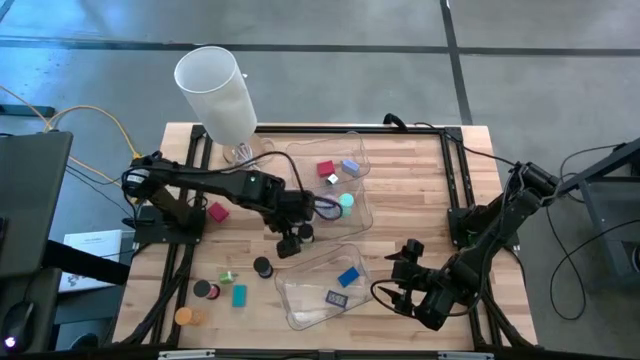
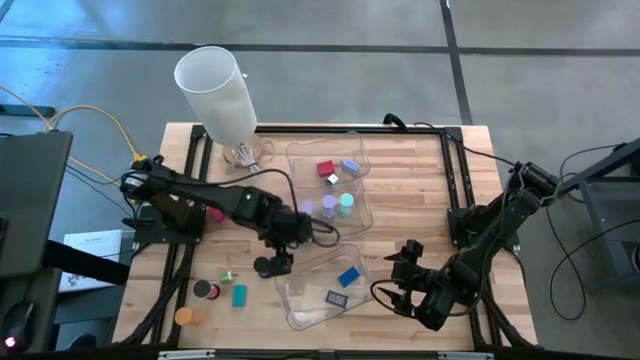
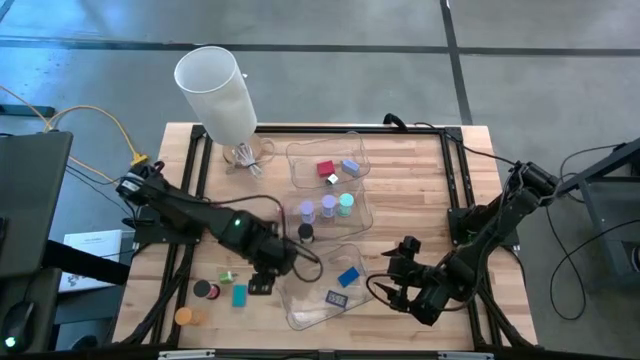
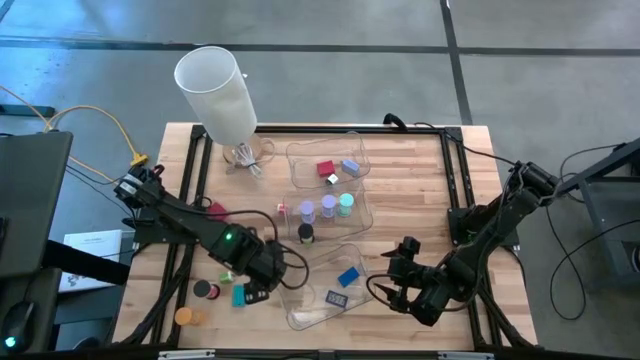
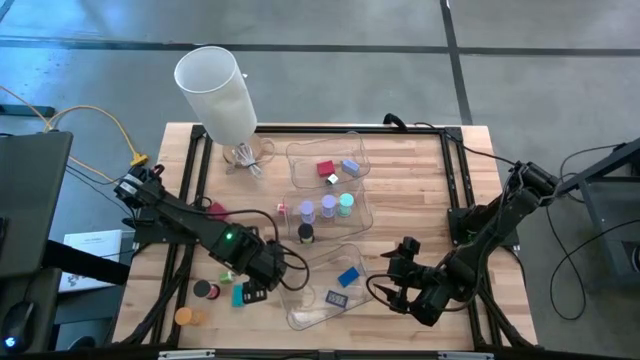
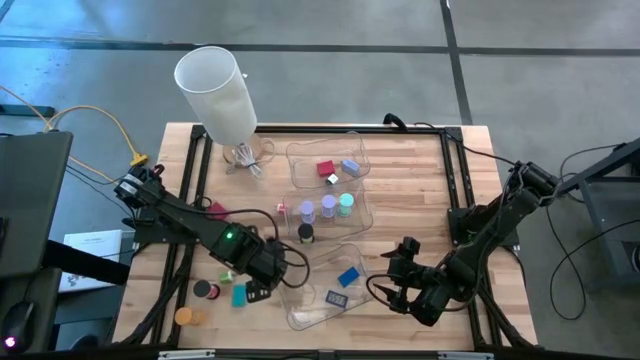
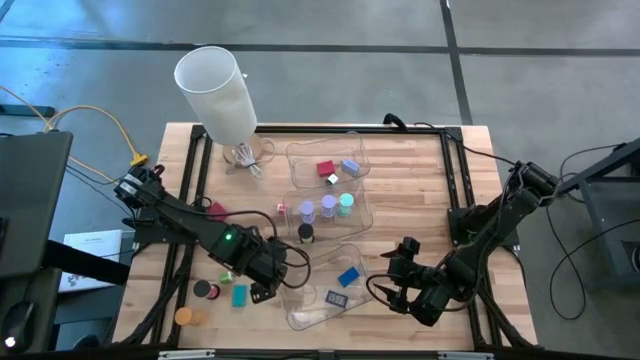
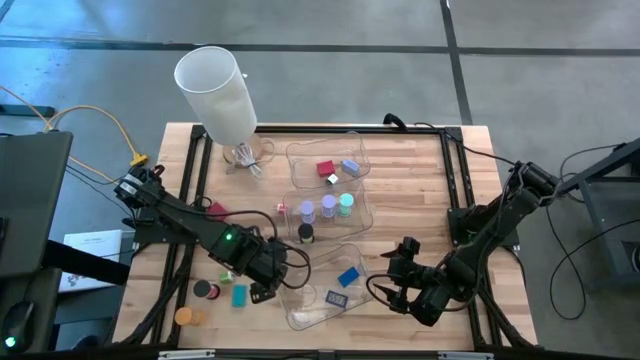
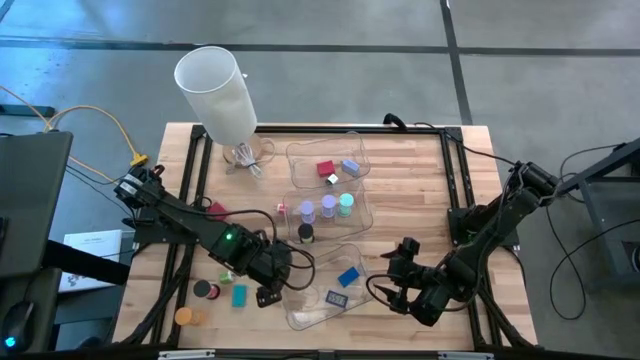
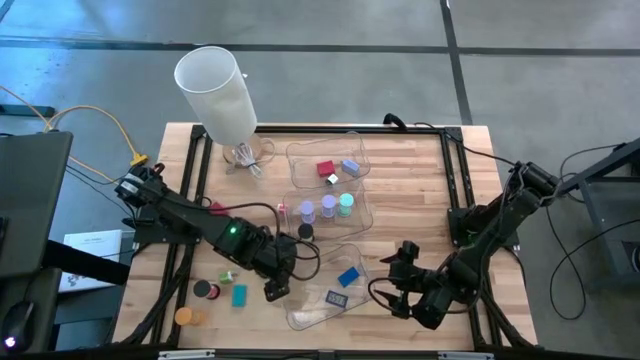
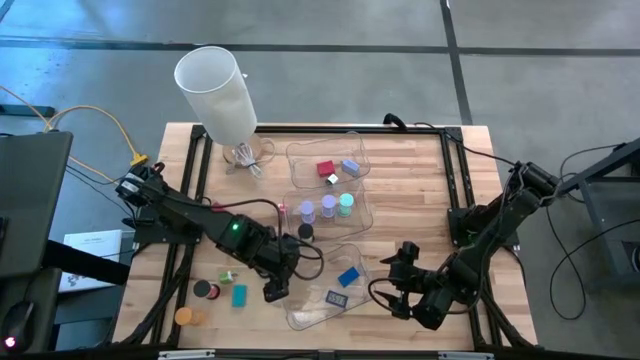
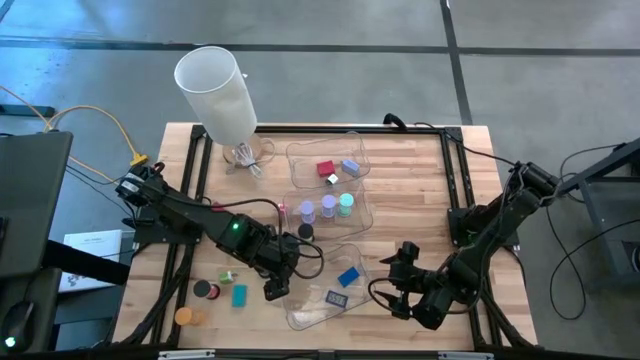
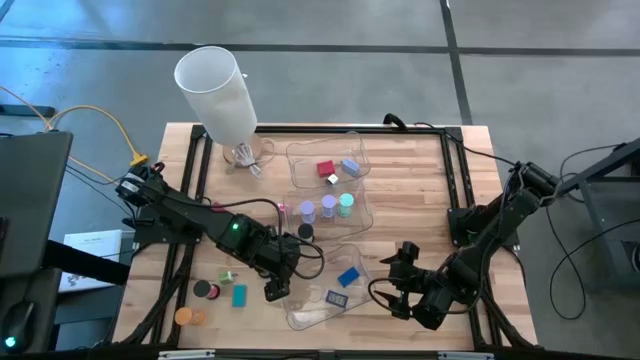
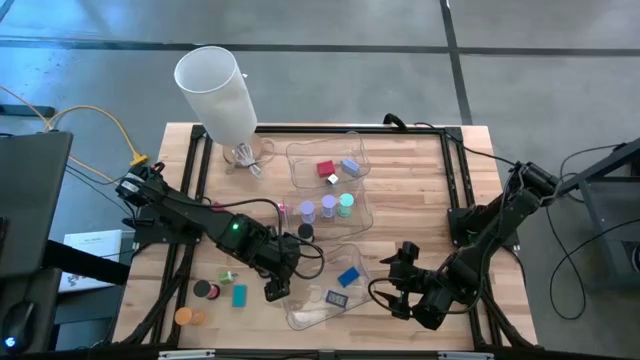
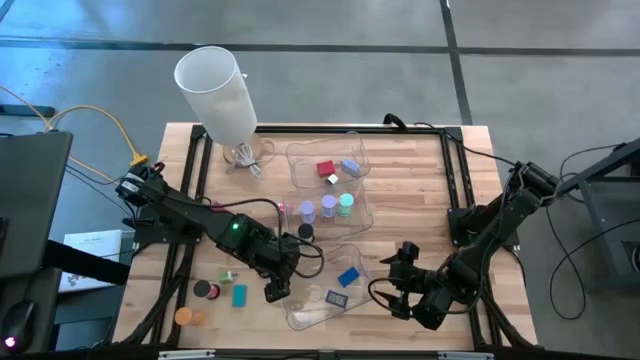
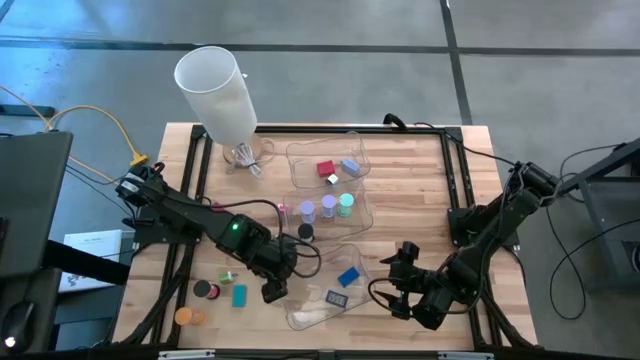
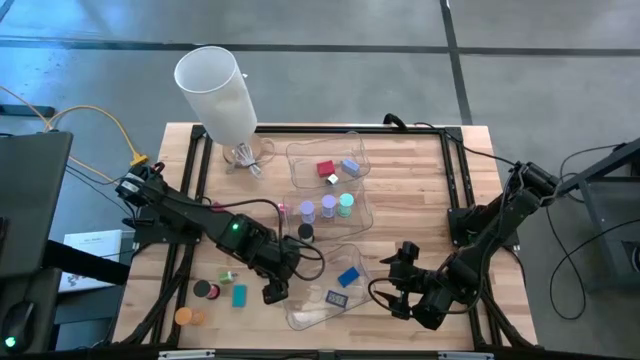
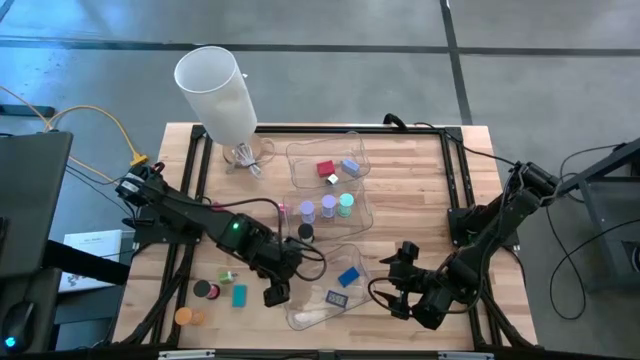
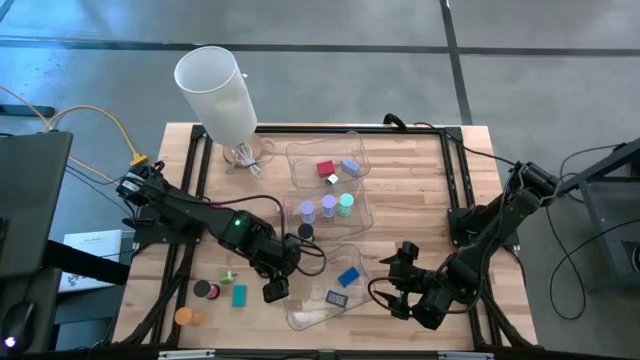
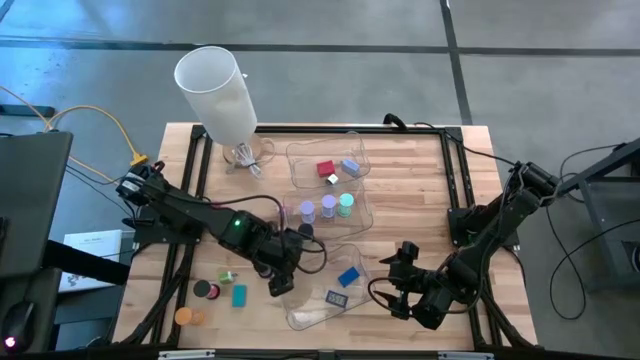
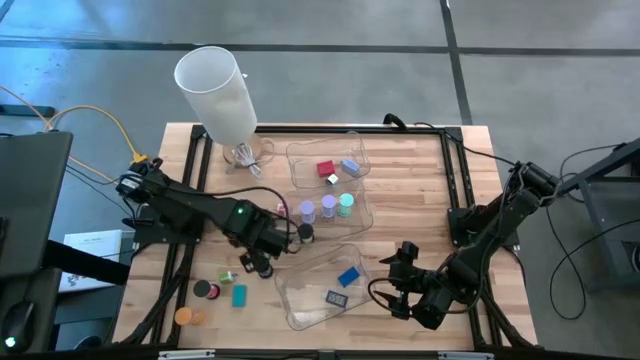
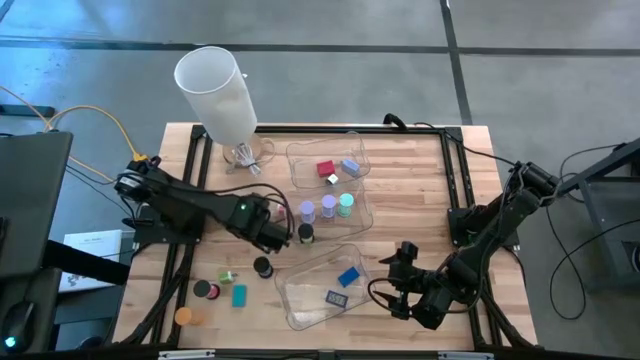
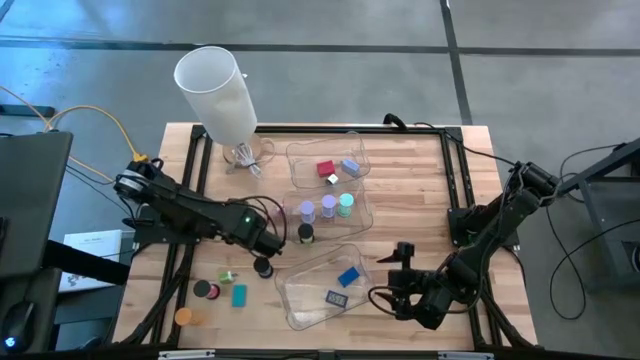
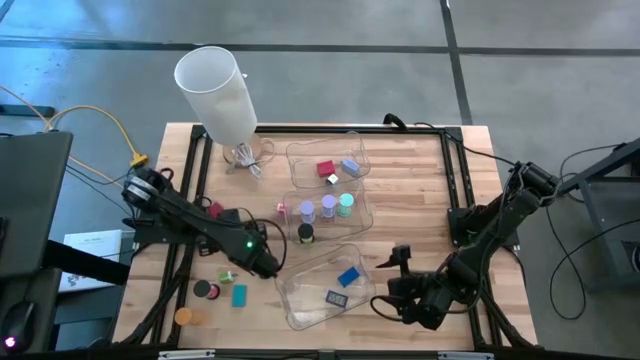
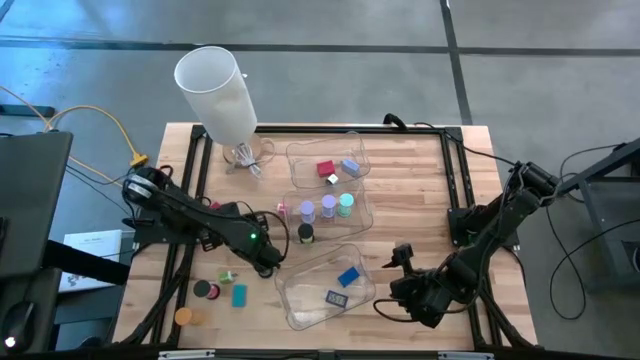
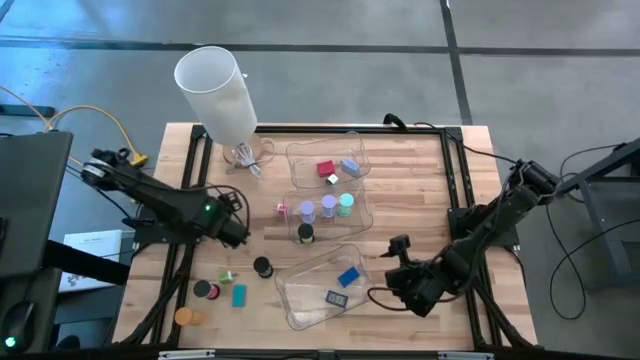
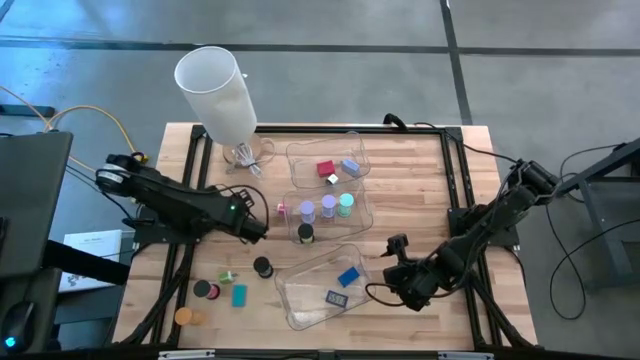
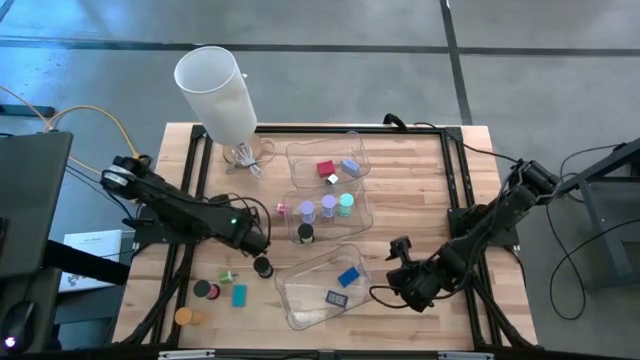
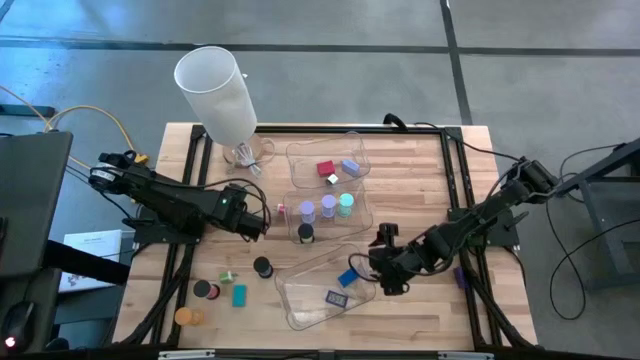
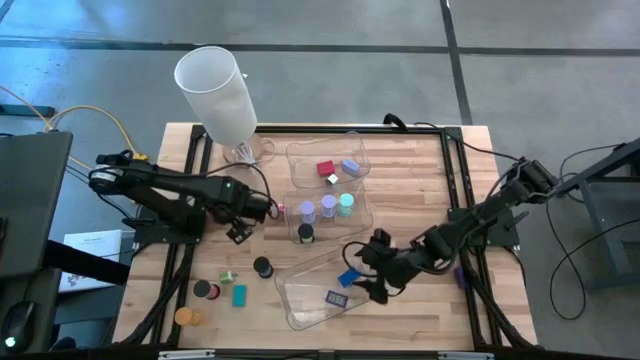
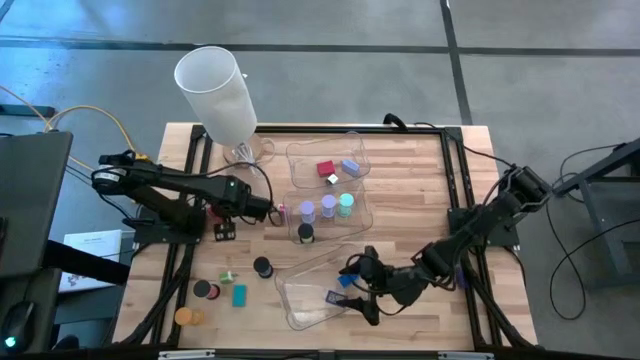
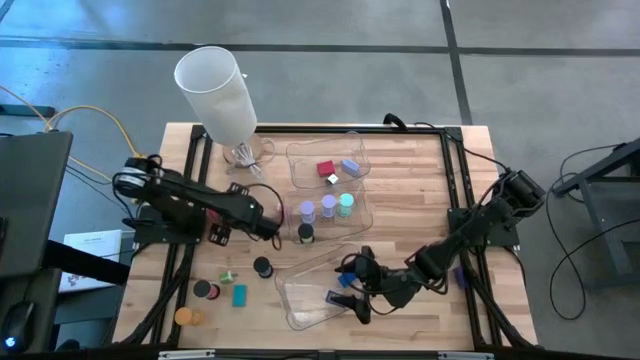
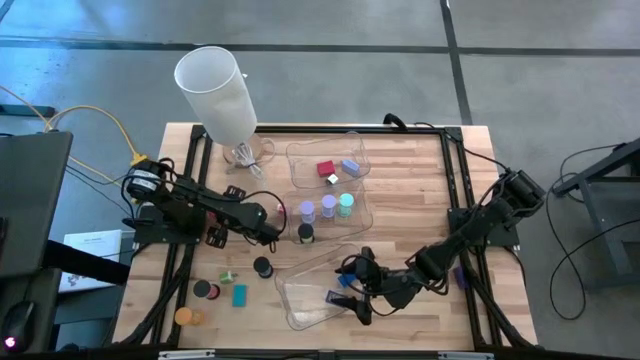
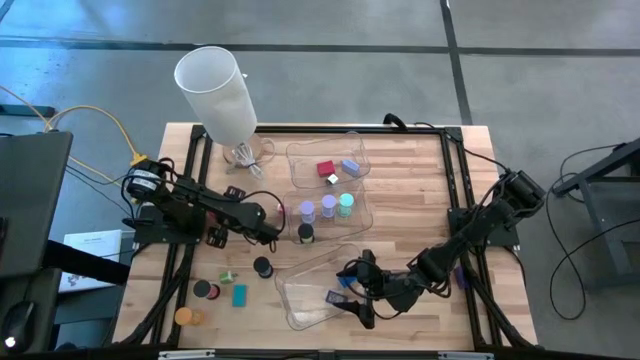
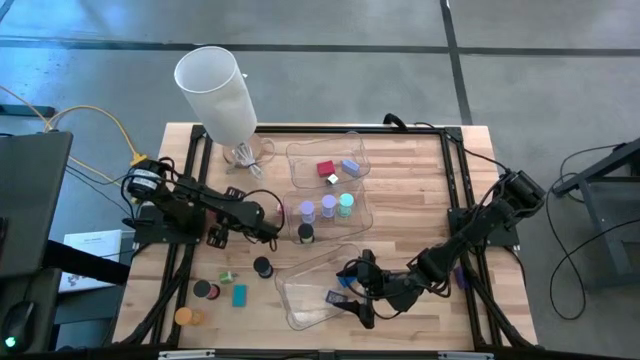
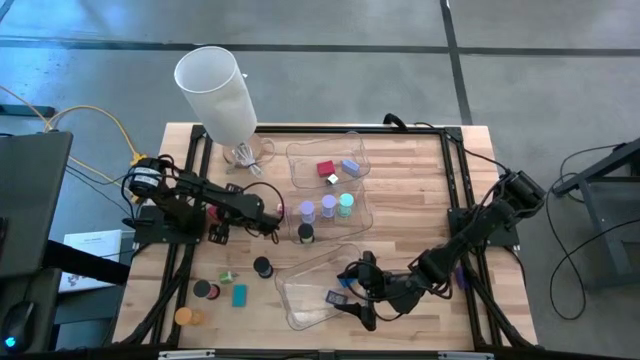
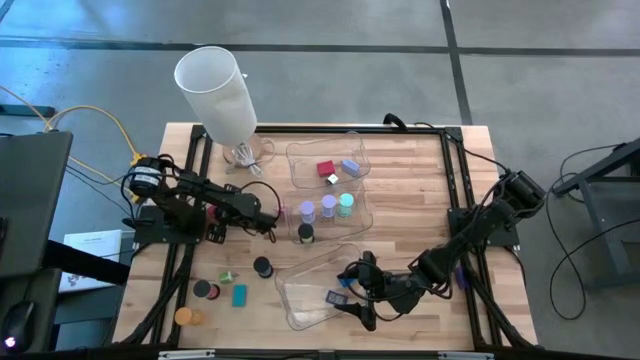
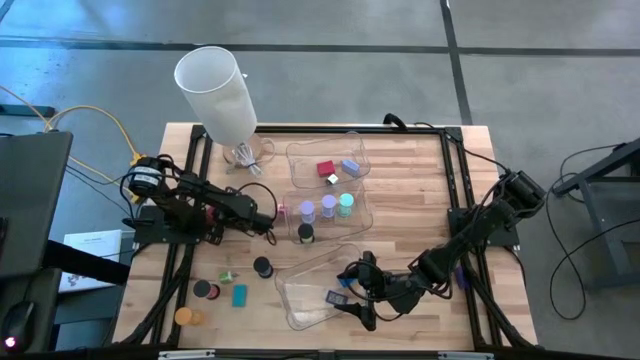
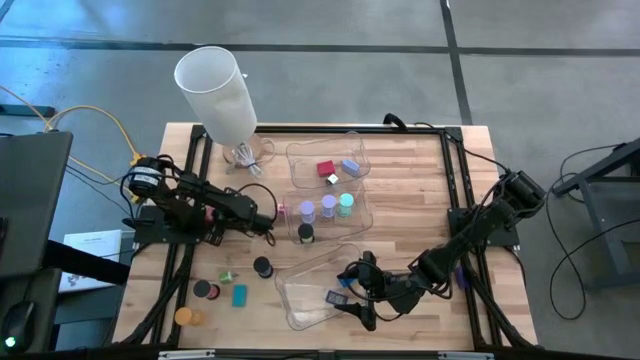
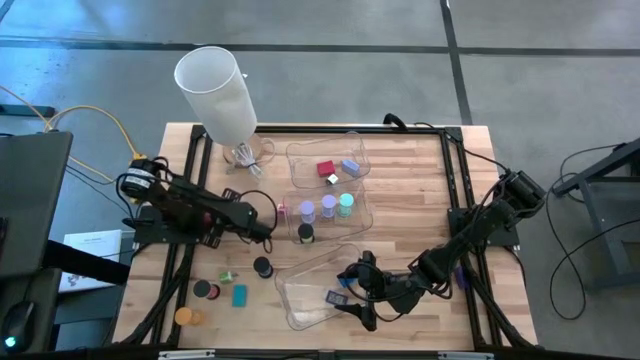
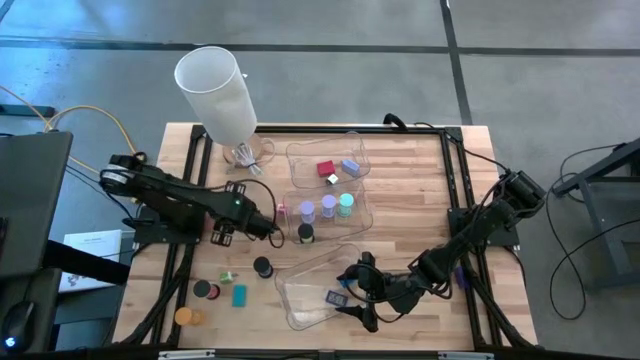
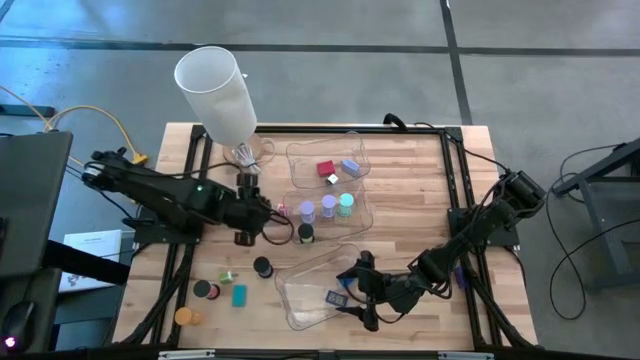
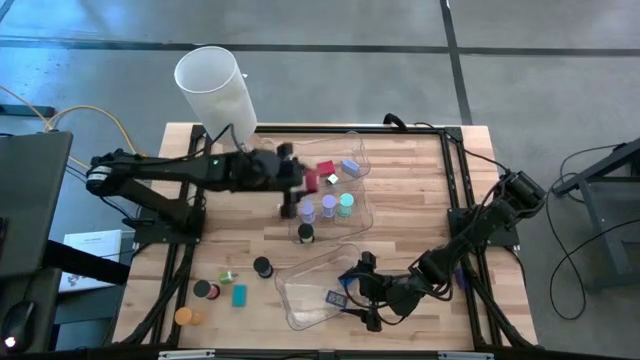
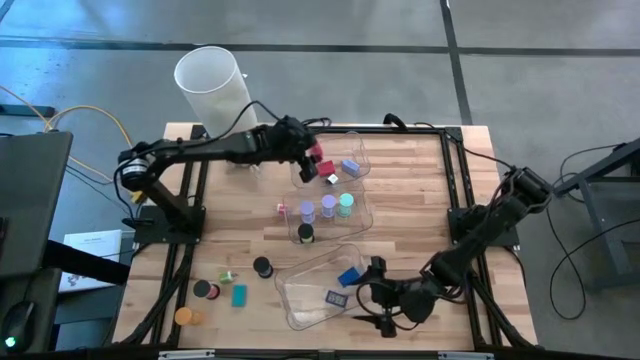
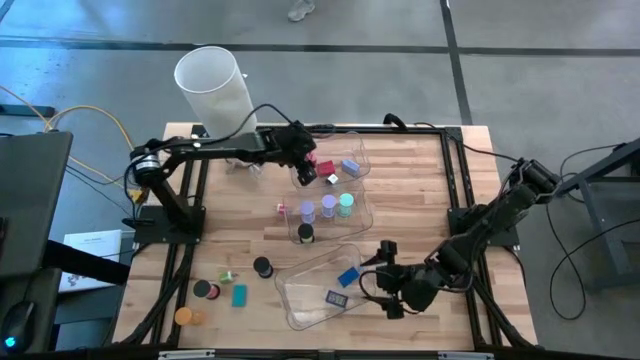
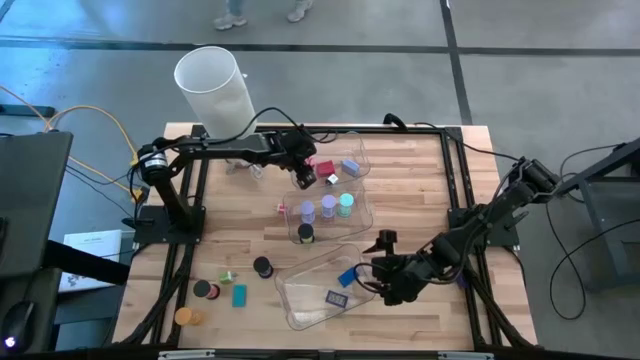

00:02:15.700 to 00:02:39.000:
Task: Pick & Place Office items
Put the red charger adapter into the top transparent bin
